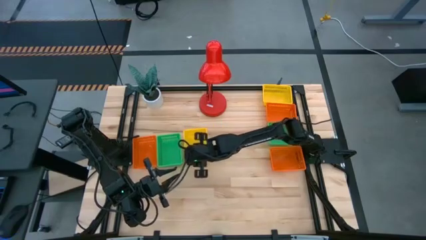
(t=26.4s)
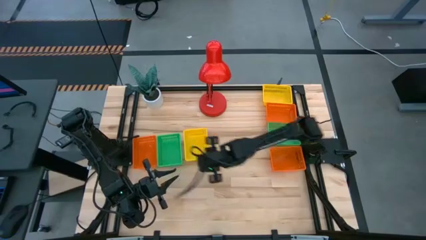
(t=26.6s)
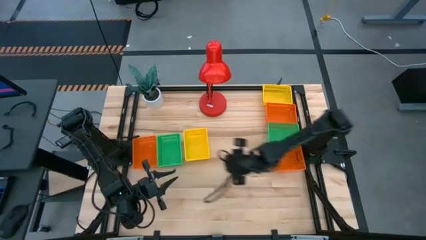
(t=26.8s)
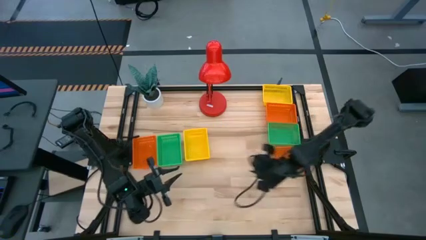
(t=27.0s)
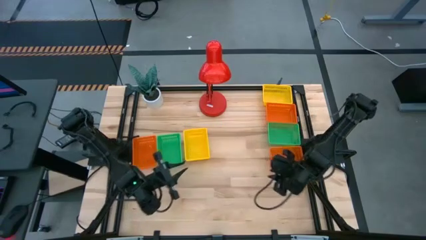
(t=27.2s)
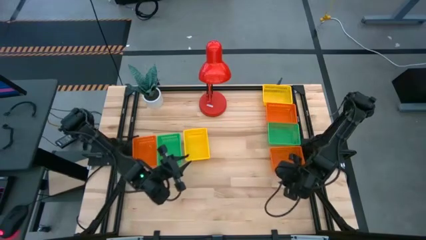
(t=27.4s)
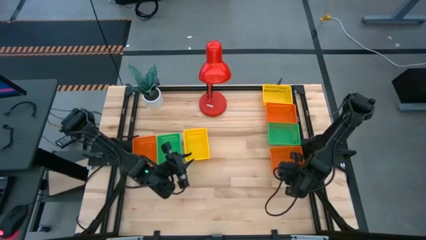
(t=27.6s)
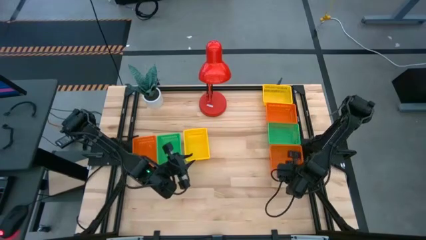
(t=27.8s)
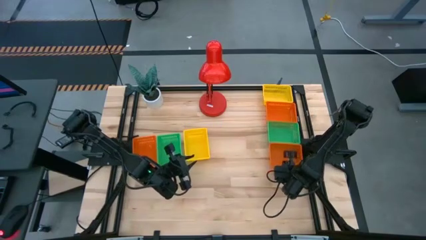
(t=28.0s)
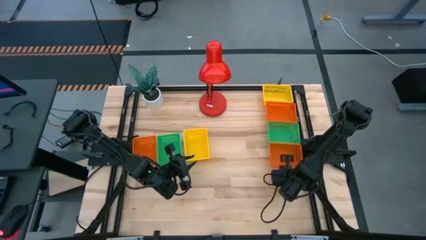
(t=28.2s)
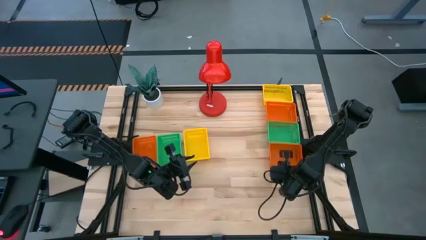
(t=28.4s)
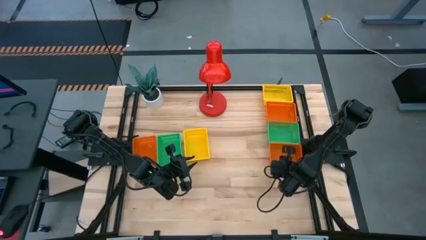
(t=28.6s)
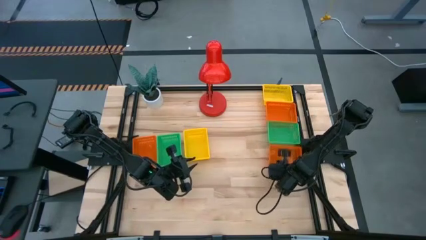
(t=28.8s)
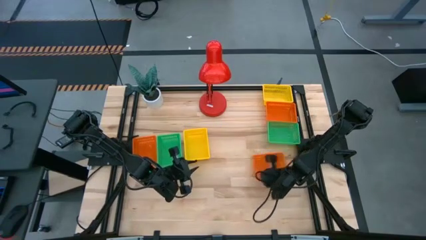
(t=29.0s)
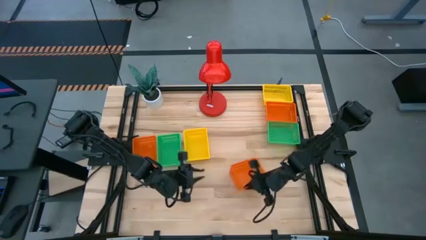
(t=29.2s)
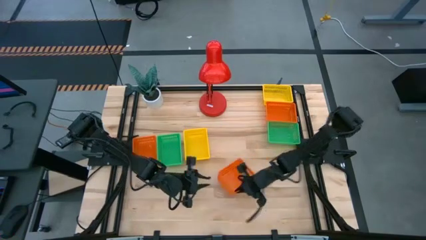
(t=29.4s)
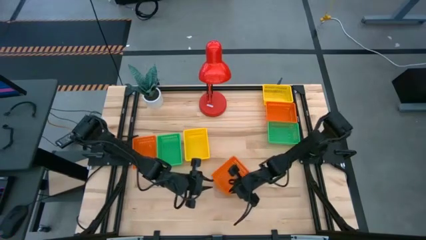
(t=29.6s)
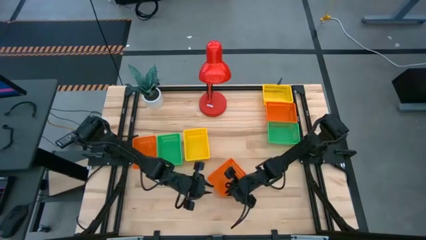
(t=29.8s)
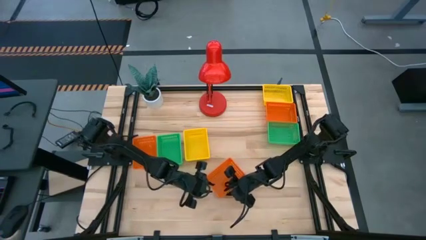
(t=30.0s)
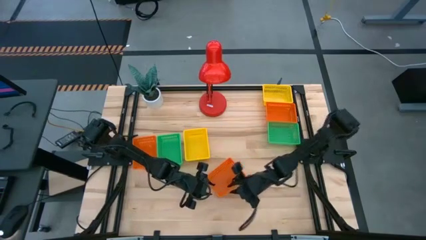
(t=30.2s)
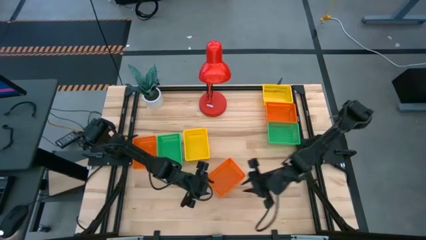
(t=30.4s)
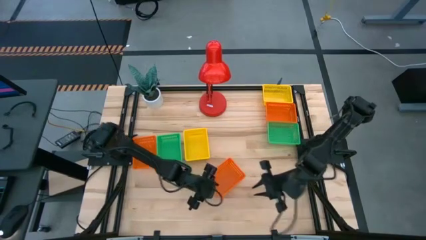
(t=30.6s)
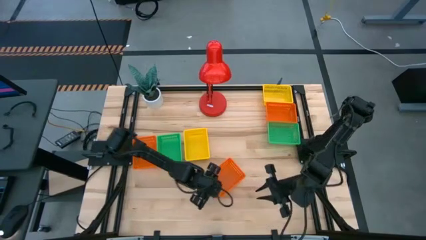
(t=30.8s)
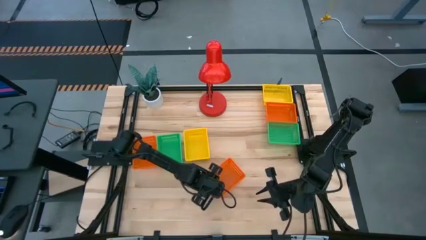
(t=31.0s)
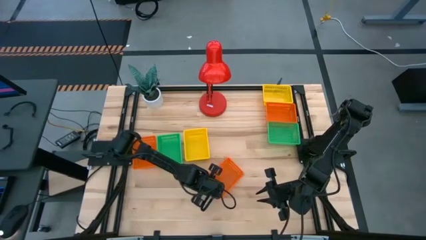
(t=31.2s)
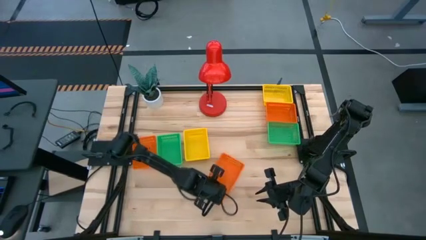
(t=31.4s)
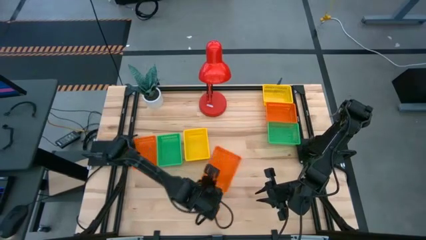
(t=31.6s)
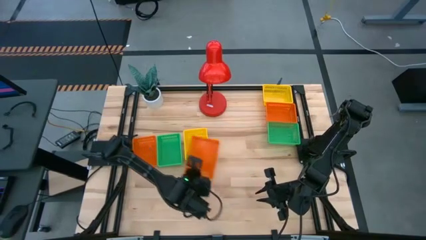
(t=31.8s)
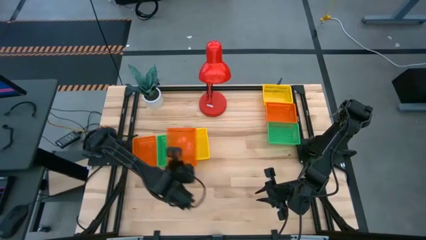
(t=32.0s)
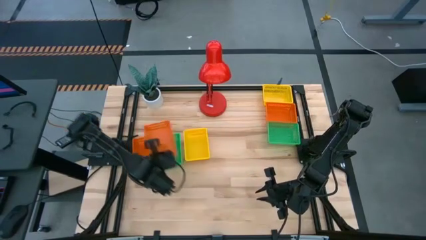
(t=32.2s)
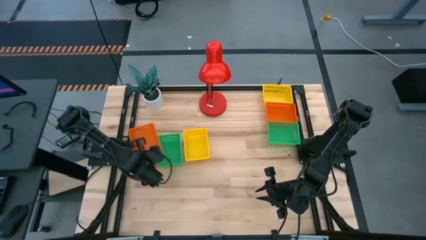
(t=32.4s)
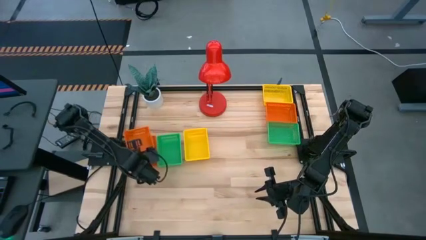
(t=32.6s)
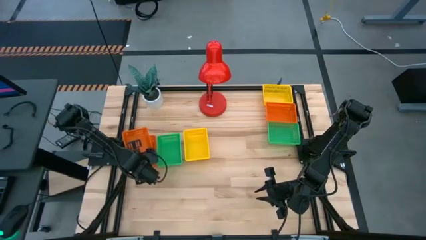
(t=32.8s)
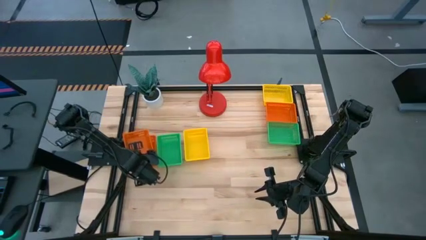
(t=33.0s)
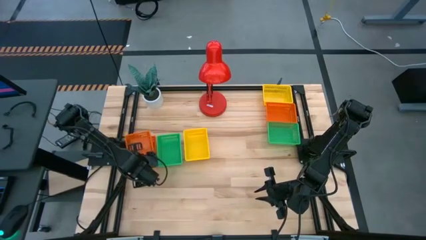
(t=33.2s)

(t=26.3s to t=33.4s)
Stack the bottom right orange bin on the left orange bin

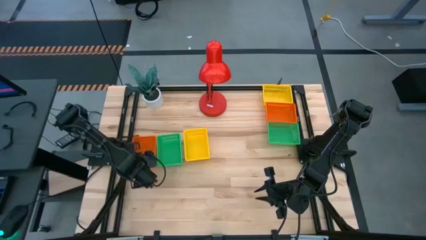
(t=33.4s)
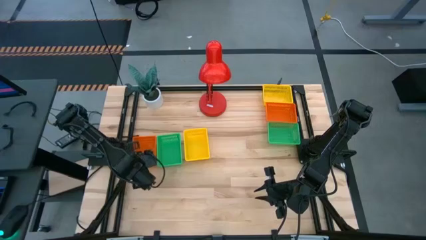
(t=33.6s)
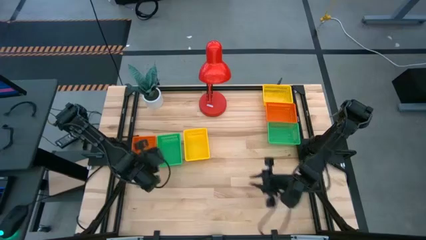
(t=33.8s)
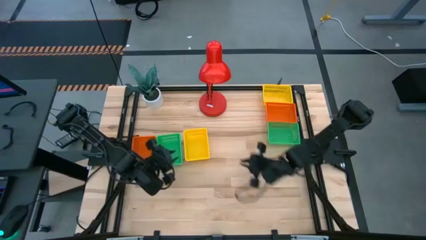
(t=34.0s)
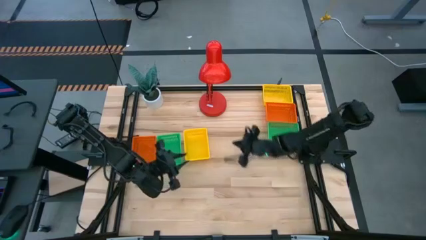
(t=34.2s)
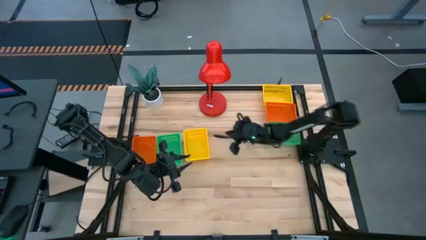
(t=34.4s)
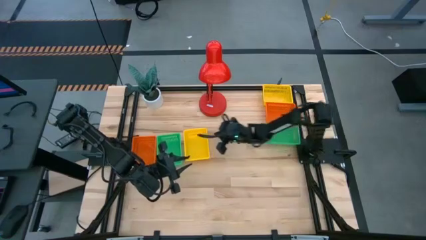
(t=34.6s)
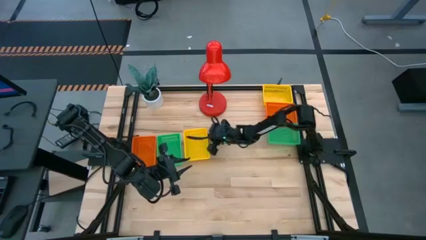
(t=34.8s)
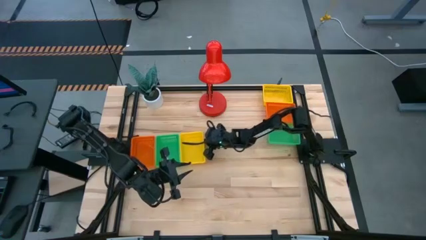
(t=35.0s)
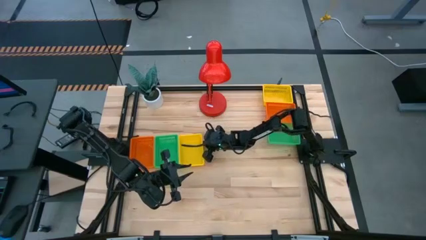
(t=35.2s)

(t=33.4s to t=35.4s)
Adjust the stacked bins

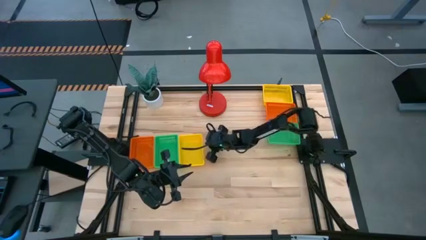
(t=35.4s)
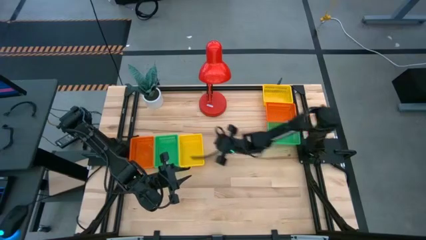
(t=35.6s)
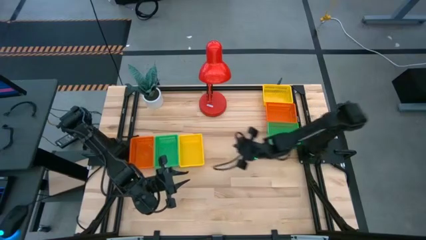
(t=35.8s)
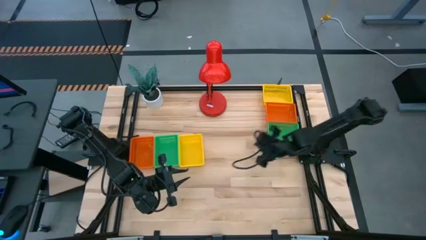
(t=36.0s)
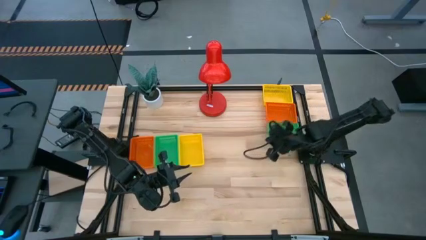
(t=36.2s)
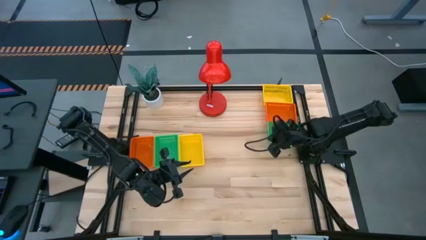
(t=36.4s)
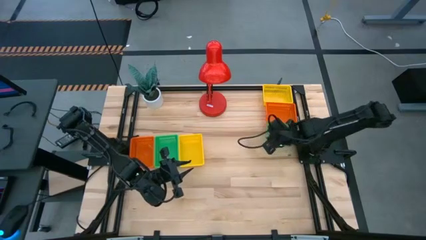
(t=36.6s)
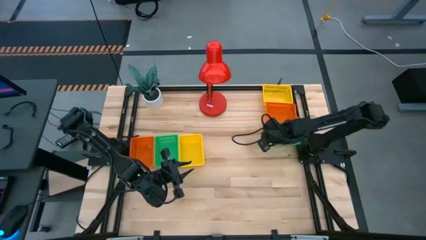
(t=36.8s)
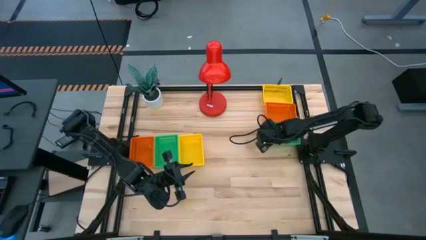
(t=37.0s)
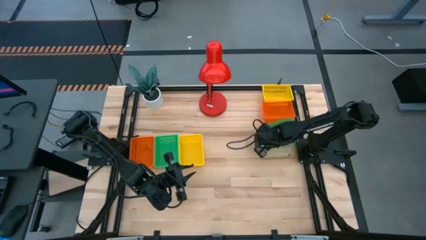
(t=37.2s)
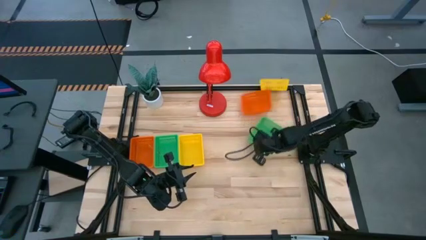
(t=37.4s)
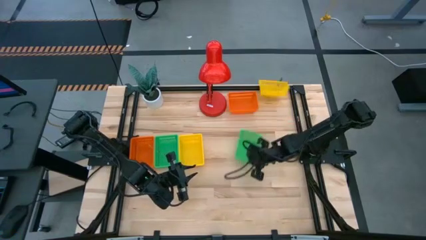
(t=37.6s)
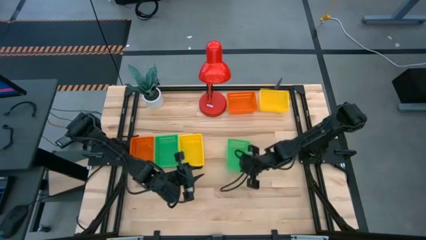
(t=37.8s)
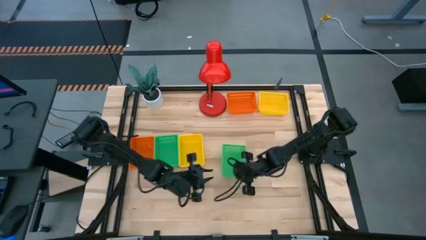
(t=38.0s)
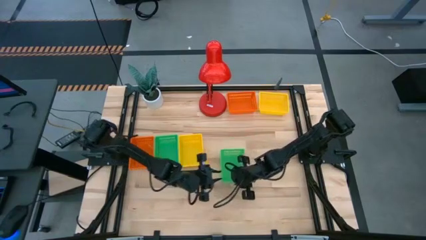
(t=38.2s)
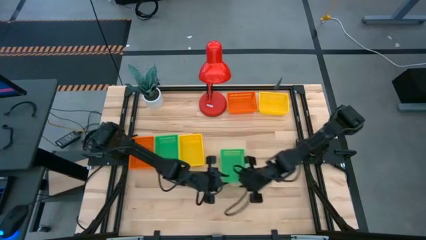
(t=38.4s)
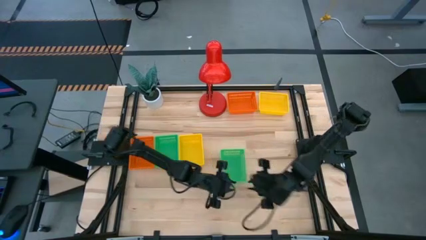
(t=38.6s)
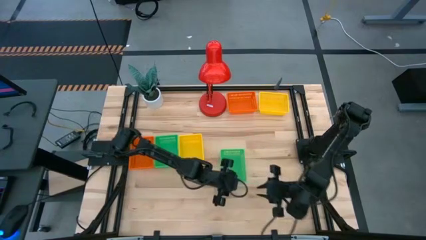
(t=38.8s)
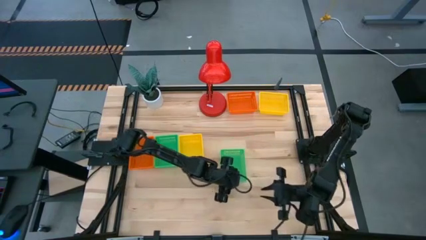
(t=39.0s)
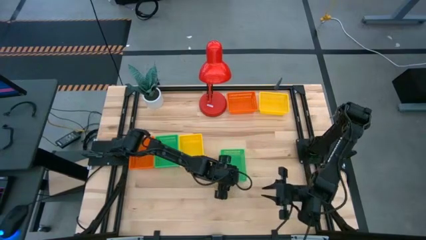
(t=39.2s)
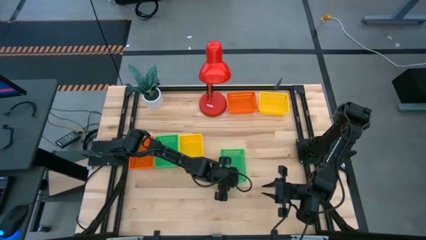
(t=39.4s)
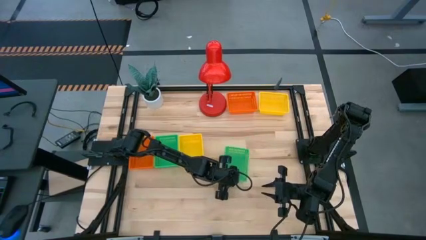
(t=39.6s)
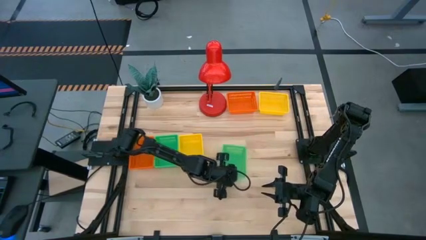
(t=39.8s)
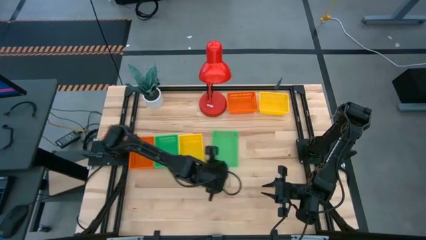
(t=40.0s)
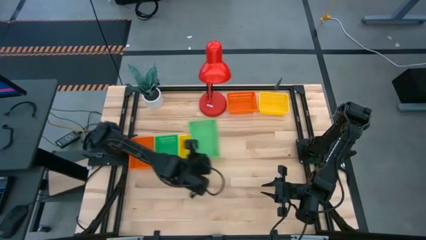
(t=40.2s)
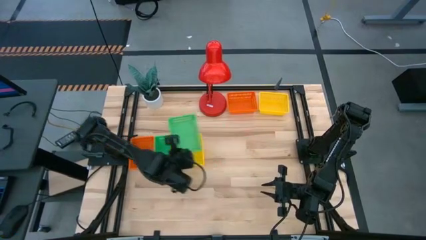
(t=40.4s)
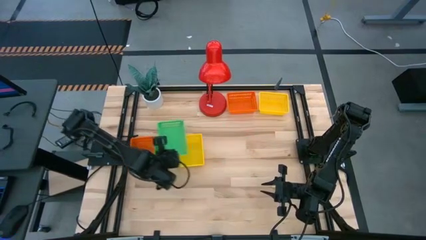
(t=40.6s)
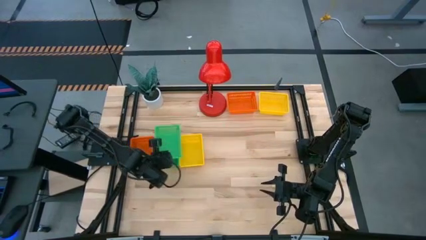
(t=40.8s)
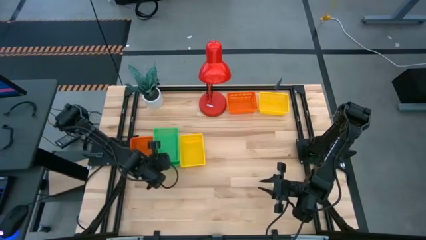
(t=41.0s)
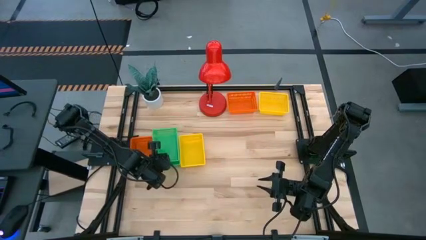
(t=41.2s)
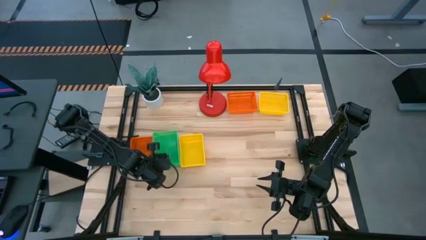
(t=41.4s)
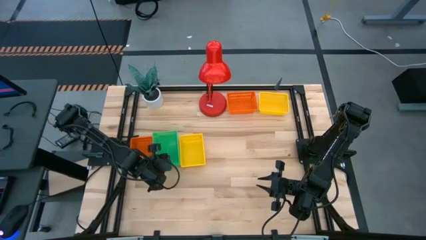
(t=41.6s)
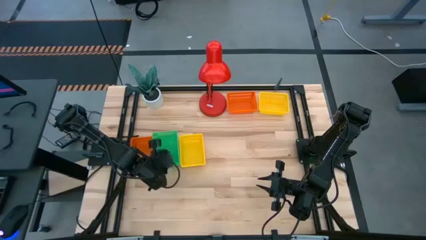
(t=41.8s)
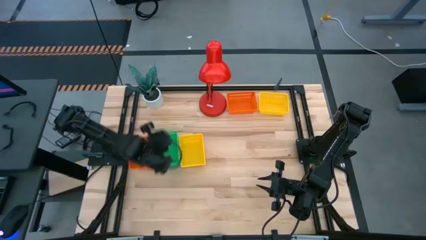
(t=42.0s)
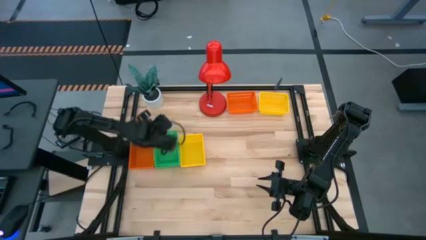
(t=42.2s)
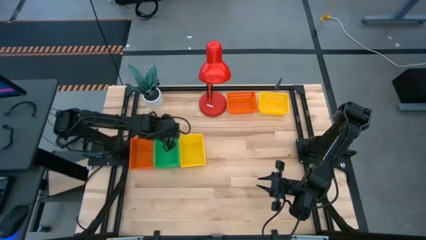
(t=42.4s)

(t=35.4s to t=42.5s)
Stack the right green bin on the left stacked green bins
